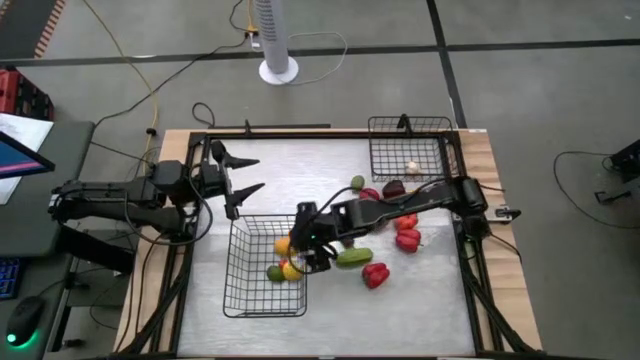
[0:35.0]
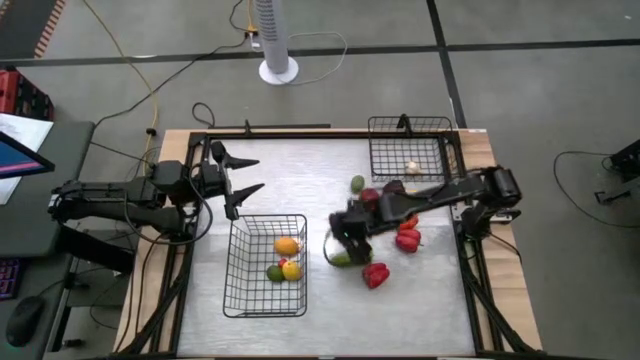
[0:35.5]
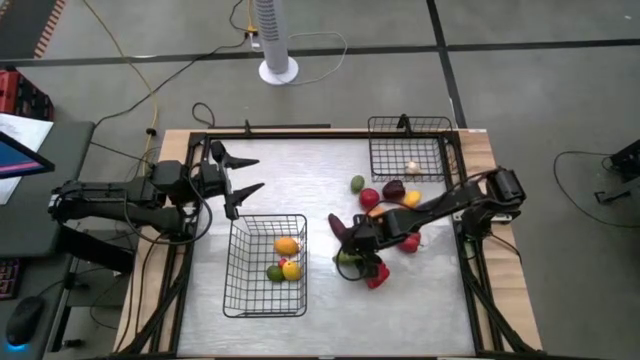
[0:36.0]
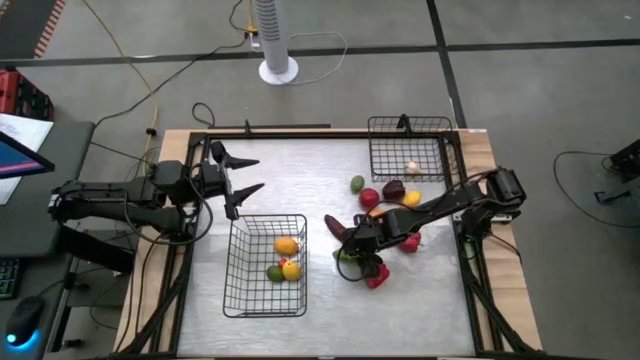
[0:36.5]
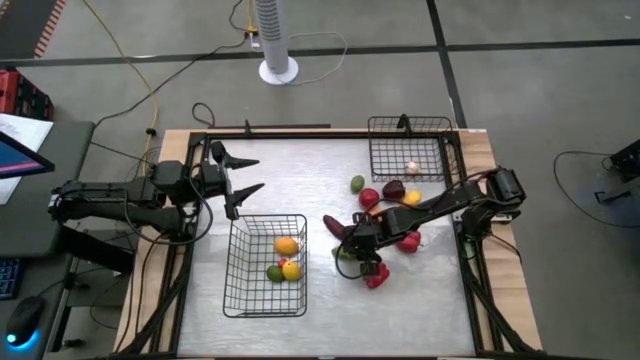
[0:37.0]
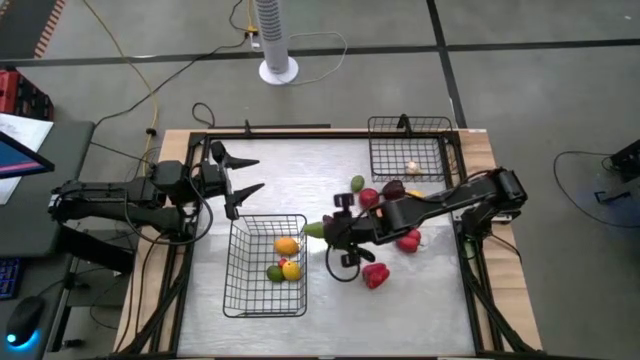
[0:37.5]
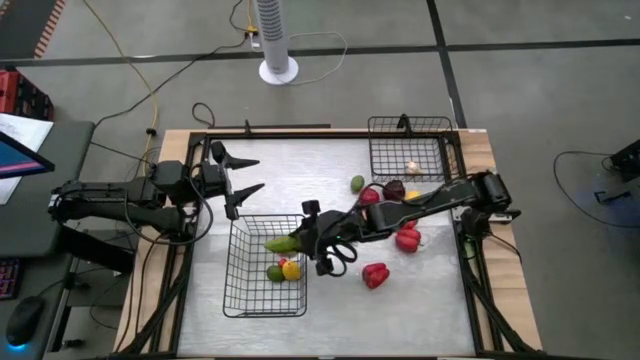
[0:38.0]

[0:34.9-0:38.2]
Task: Sort produce into baskets
Put the cucumber into the bottom wire basket

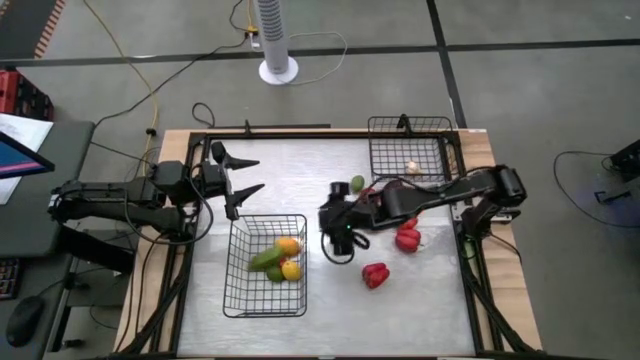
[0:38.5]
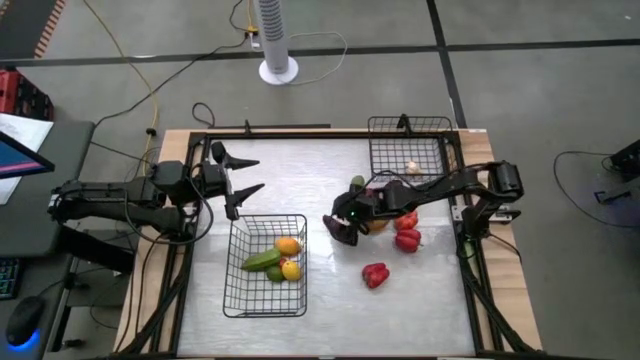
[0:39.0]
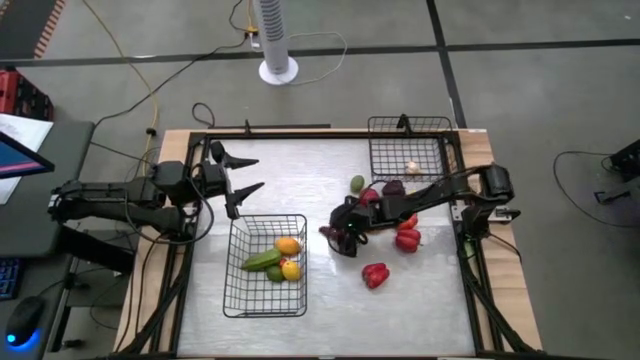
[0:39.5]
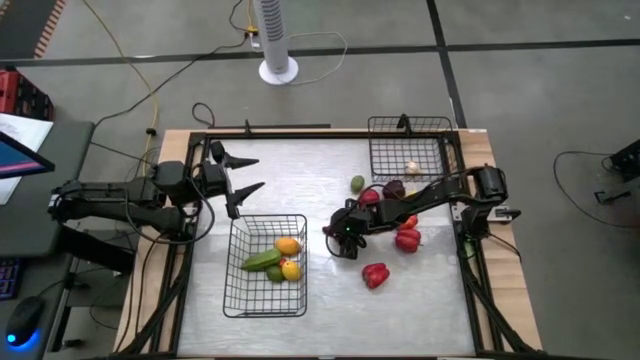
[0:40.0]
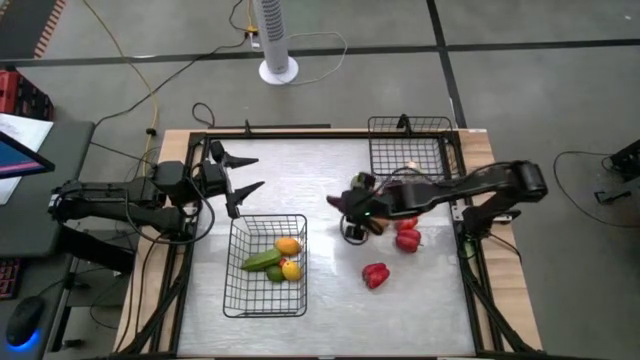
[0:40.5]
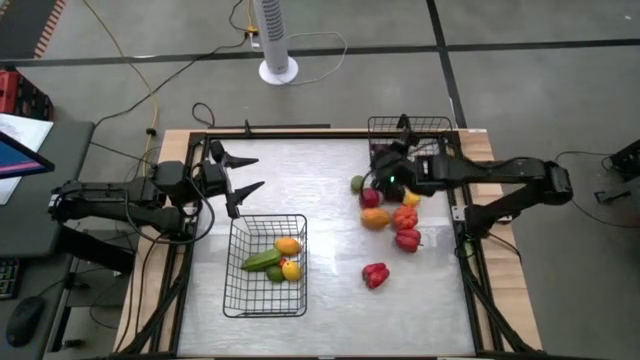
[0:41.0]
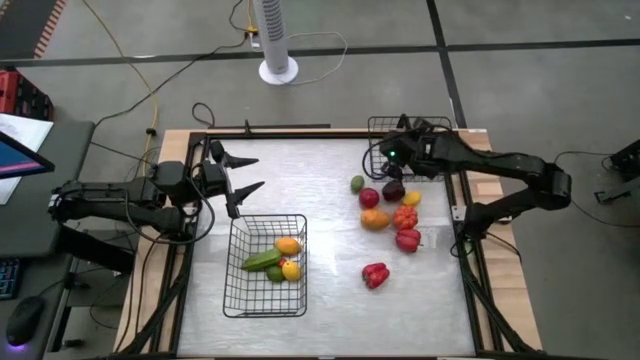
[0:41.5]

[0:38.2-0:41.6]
Put the chili pepper into the top wire basket

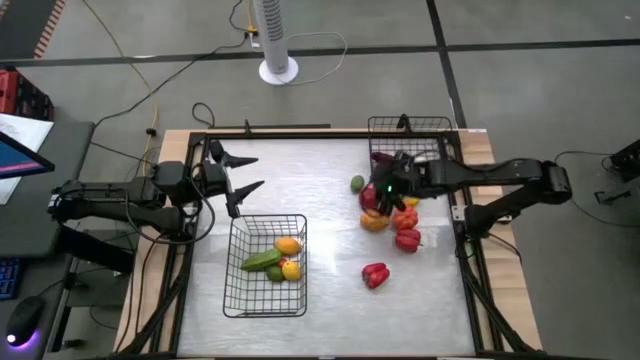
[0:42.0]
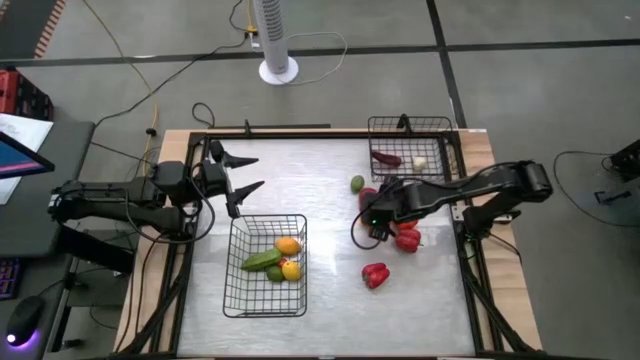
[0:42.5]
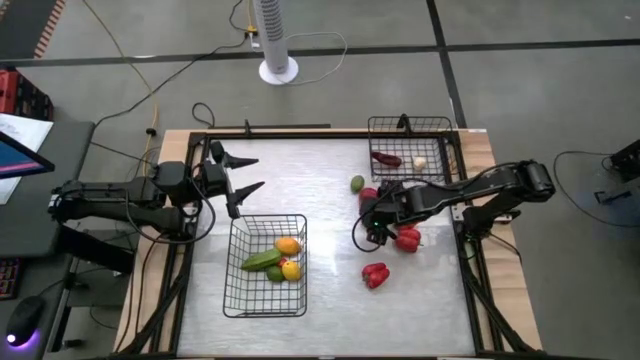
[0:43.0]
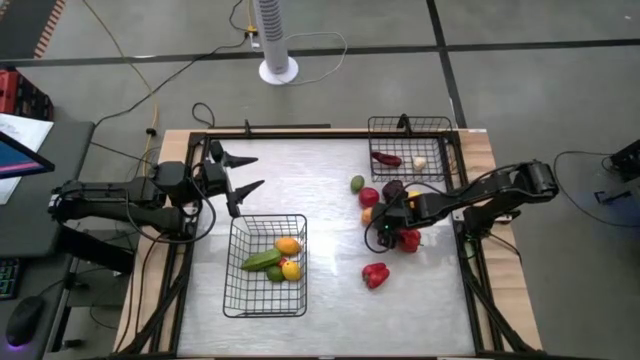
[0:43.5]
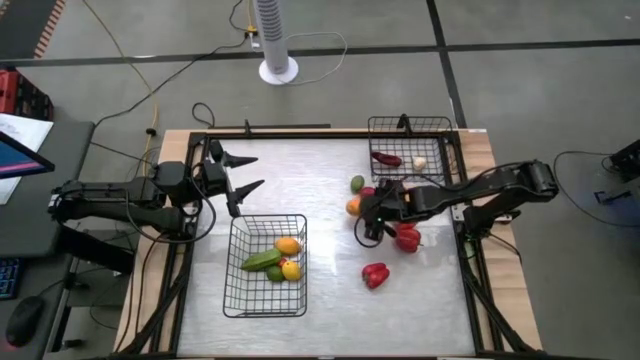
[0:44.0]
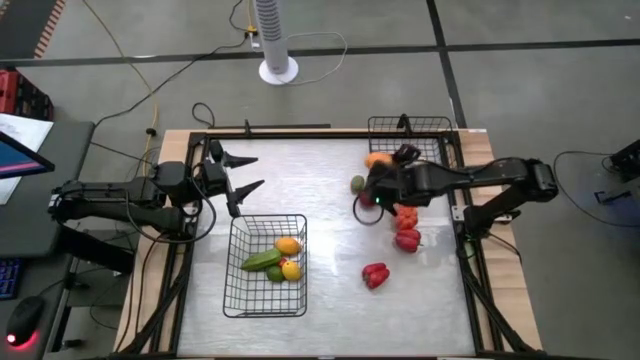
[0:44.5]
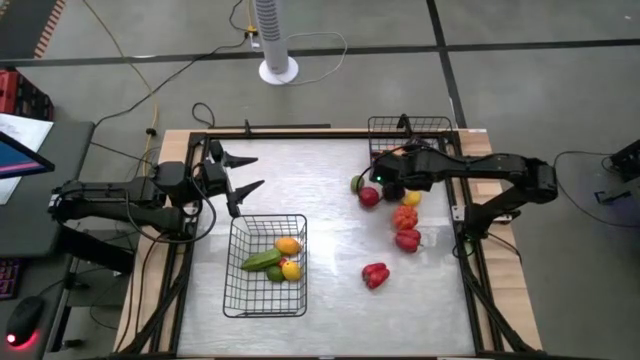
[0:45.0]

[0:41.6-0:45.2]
Put the mango into the top wire basket

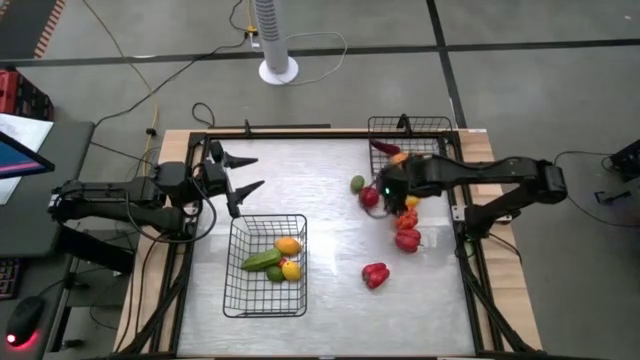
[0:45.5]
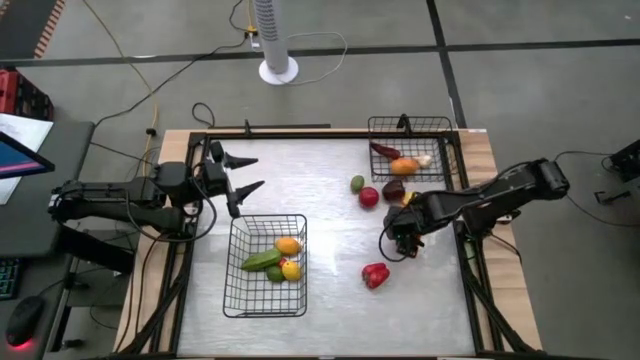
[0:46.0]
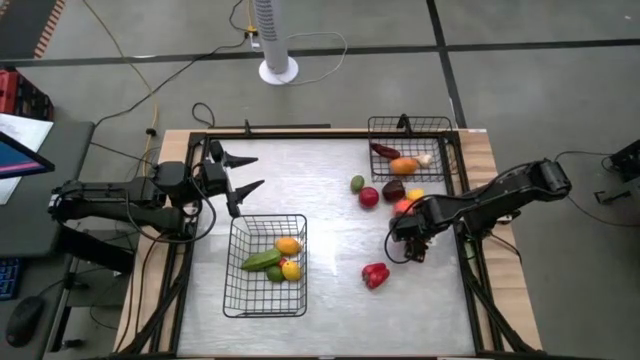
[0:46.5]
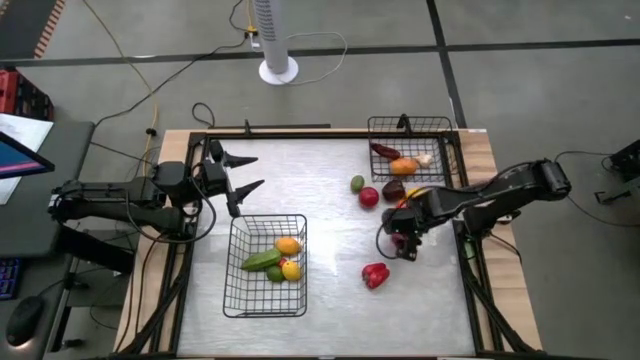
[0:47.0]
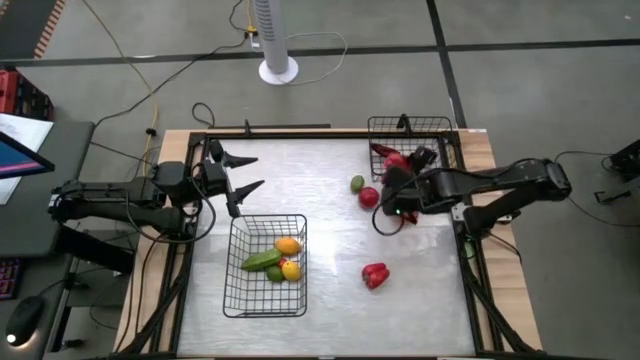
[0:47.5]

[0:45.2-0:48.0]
Put the bell pepper into the top wire basket

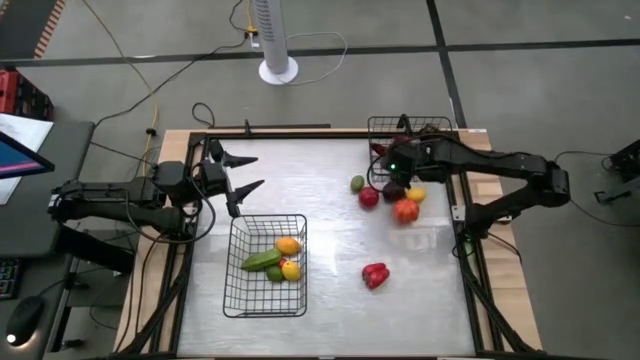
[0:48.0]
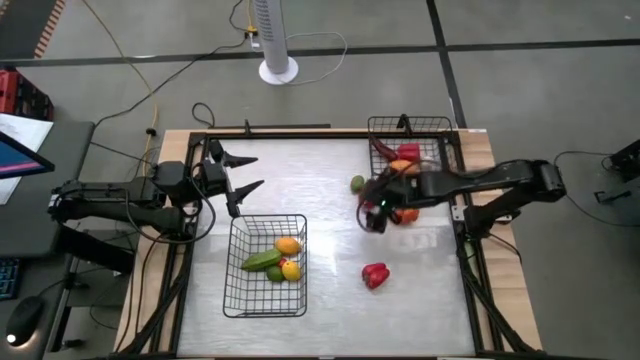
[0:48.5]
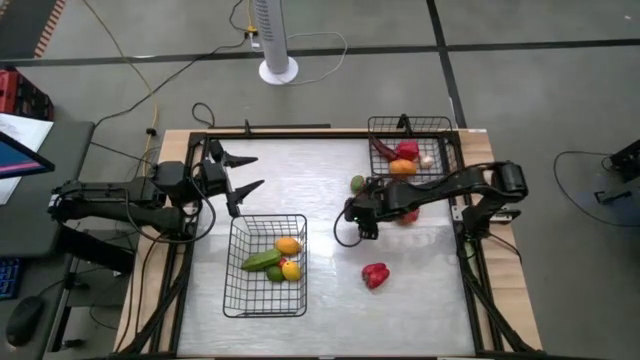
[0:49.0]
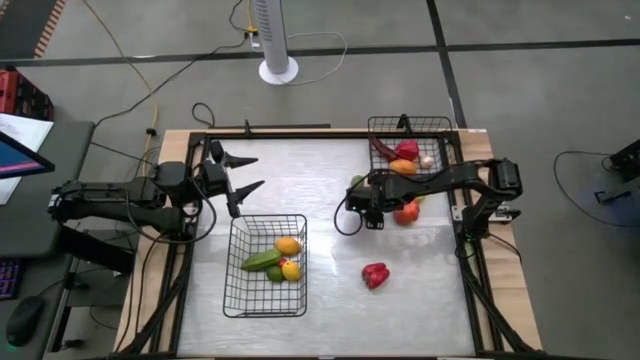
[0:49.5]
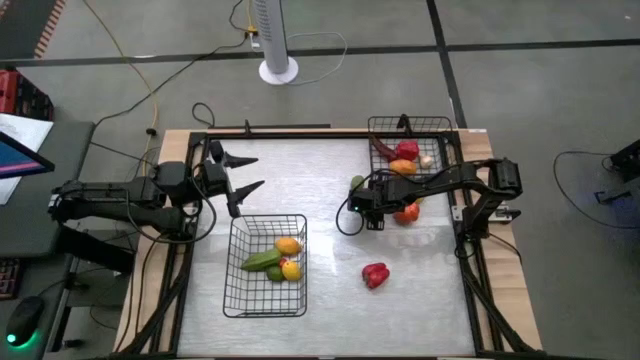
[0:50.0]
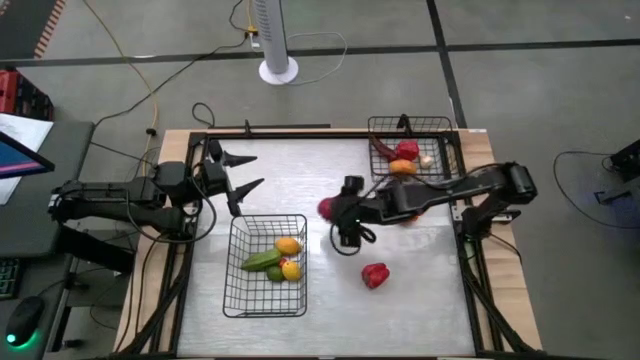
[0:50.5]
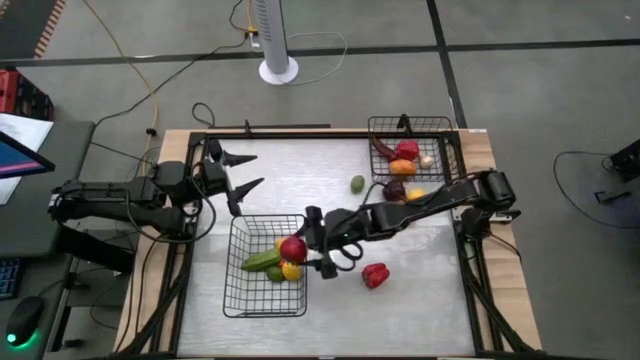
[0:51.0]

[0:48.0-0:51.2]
Put the tomato into the bottom wire basket

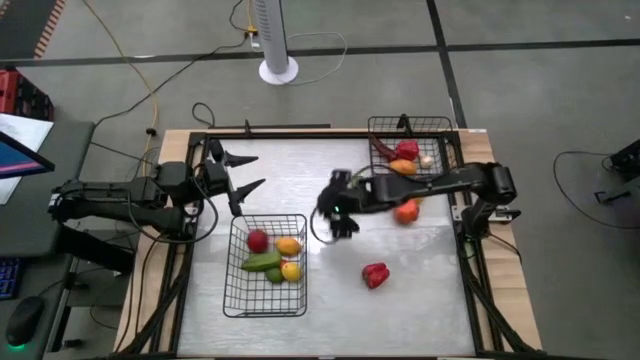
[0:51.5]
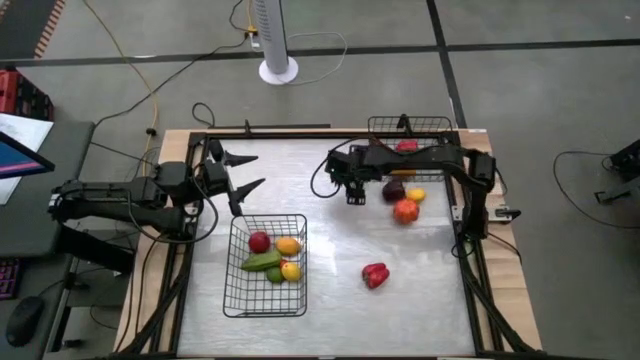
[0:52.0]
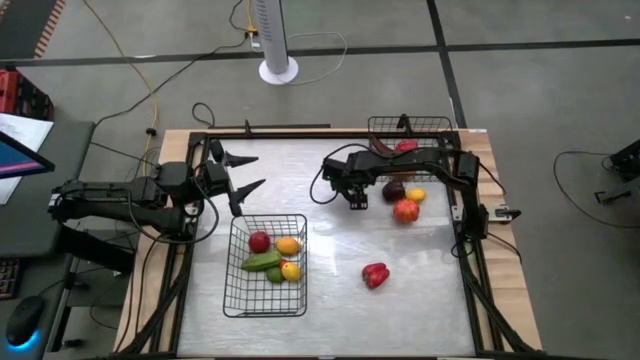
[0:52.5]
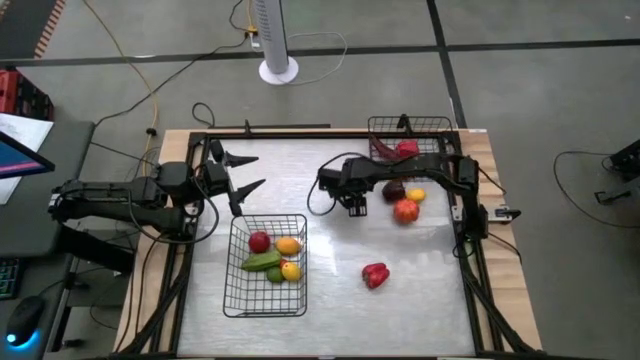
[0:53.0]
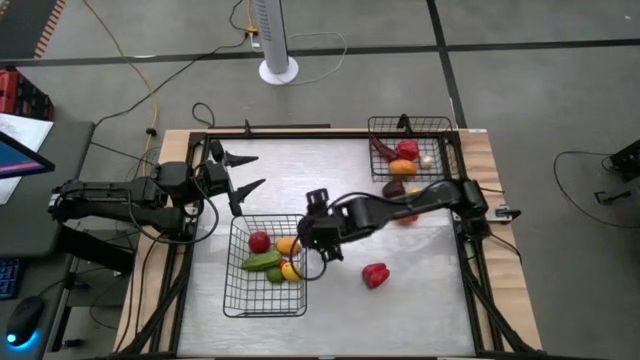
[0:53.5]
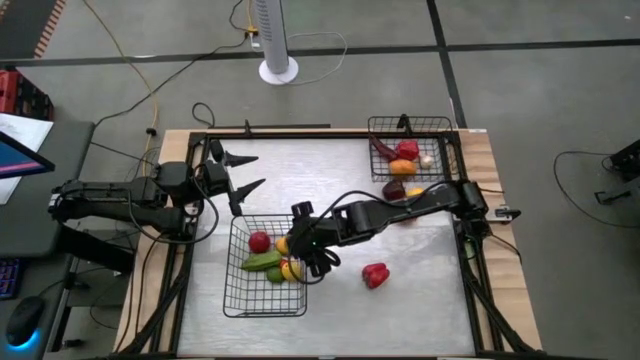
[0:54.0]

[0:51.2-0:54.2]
Put the lime into the bottom wire basket

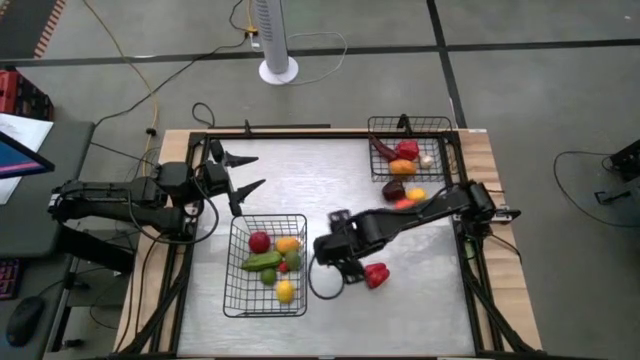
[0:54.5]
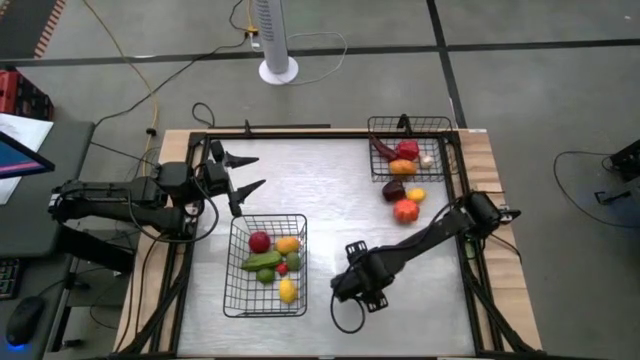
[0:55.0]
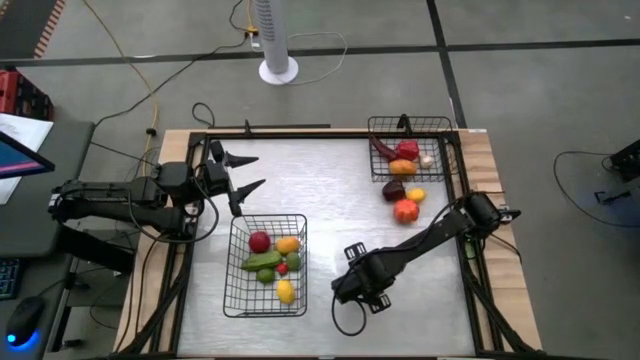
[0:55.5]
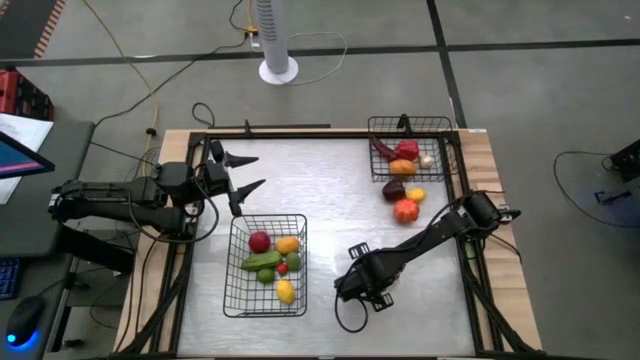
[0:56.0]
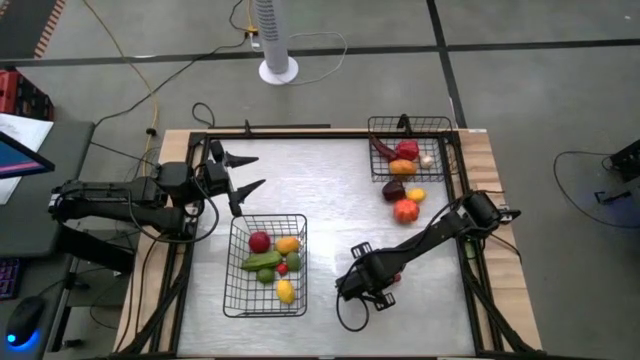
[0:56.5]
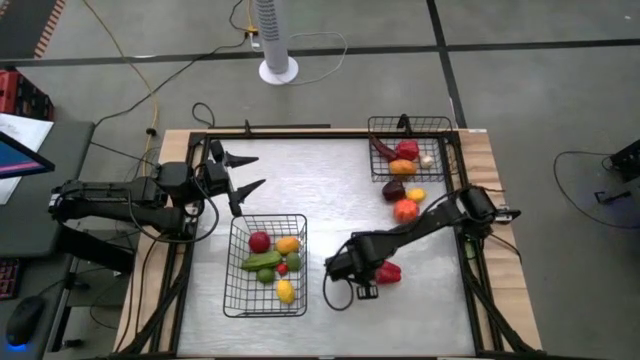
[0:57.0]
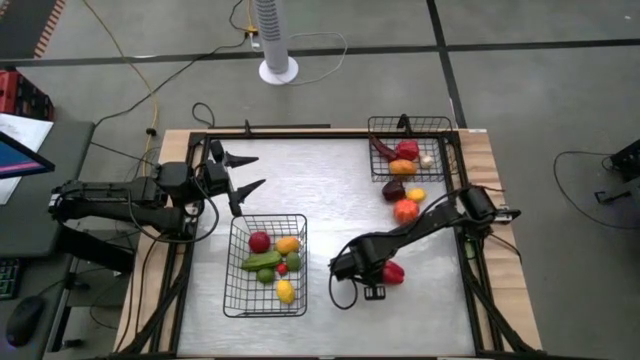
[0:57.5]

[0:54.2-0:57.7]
Put the bell pepper into the top wire basket
